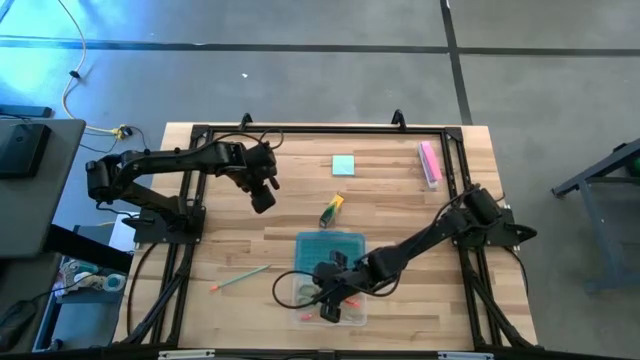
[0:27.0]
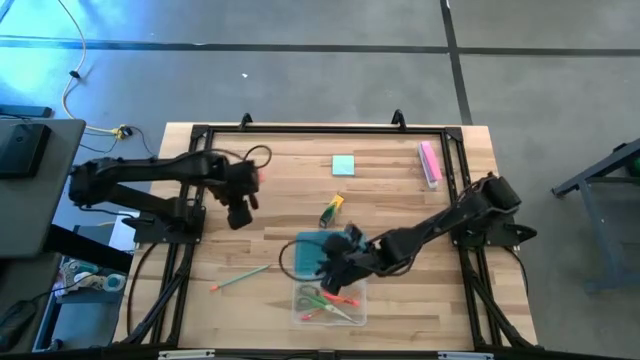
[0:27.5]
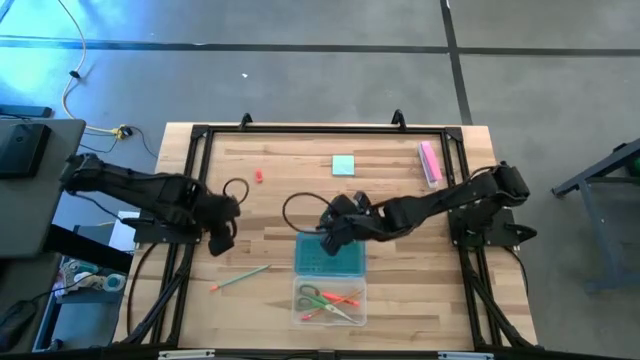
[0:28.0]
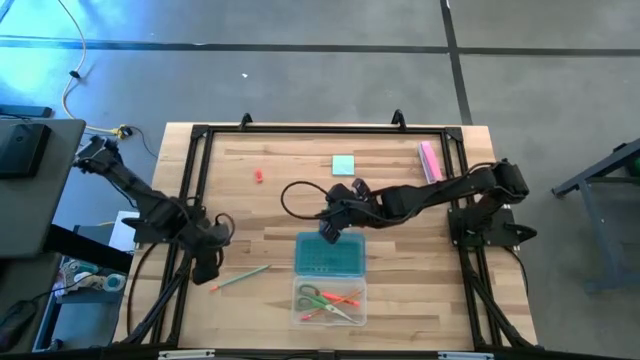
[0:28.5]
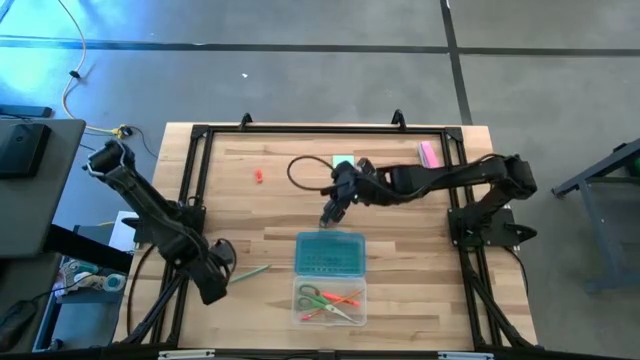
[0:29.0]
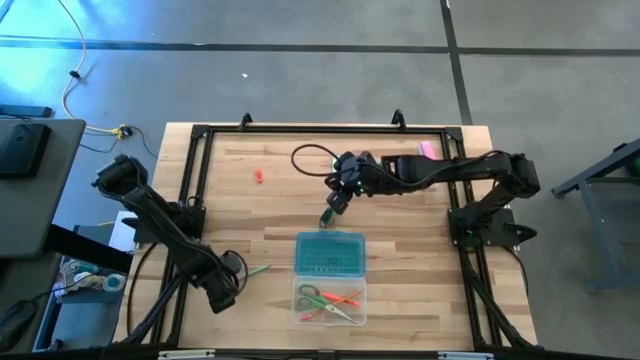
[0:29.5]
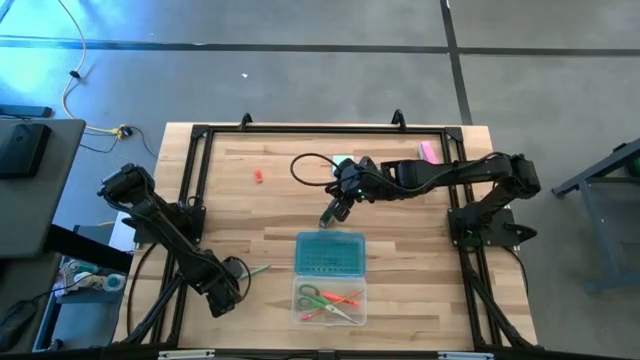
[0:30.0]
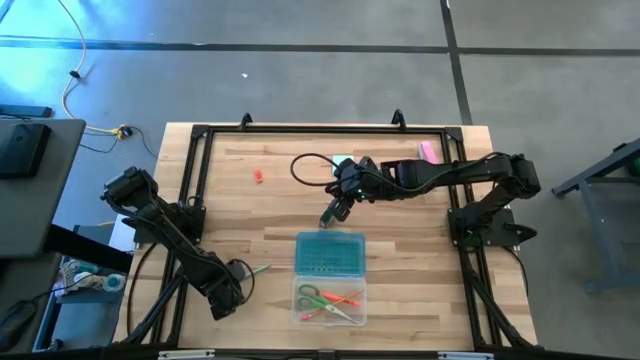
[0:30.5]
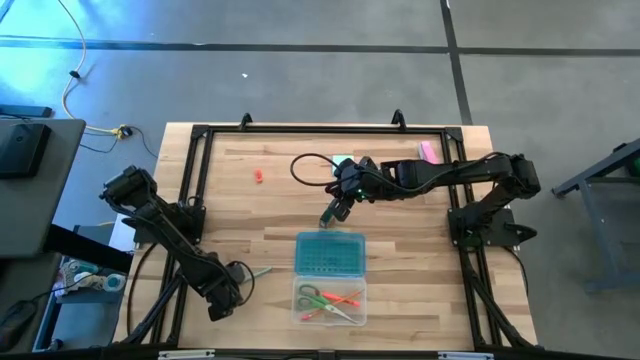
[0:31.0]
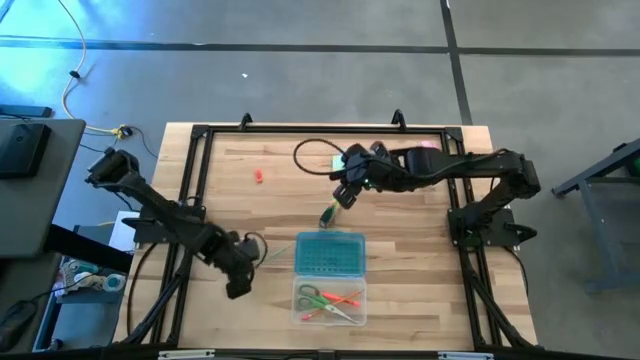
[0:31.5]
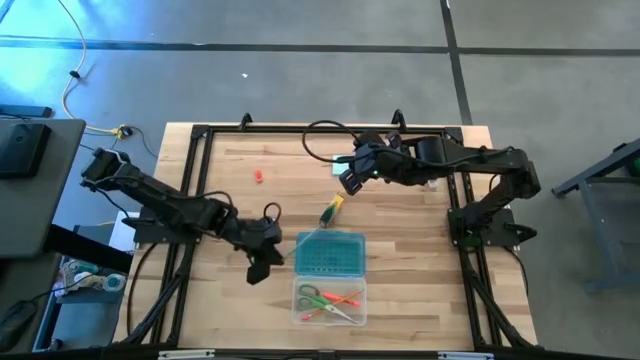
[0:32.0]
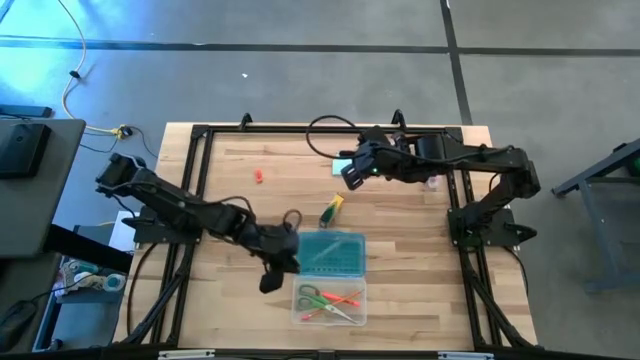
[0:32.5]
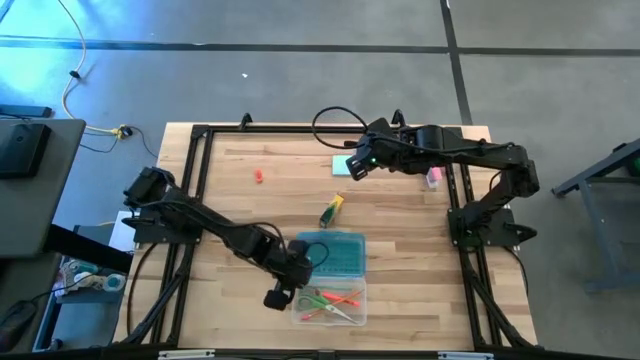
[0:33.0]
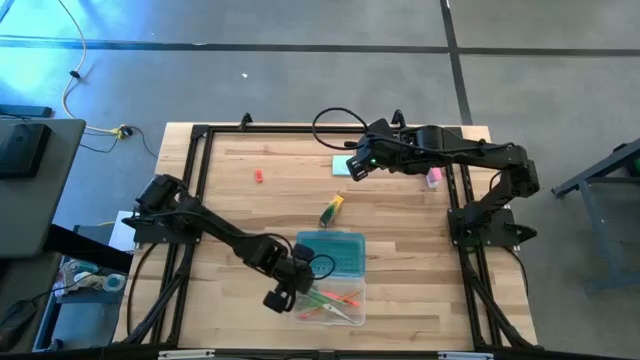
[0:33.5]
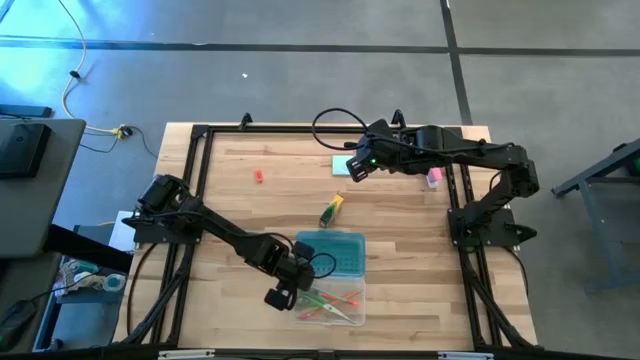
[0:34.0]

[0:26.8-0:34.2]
Task: Pack school essentials
Put the blue pencil into the supply box

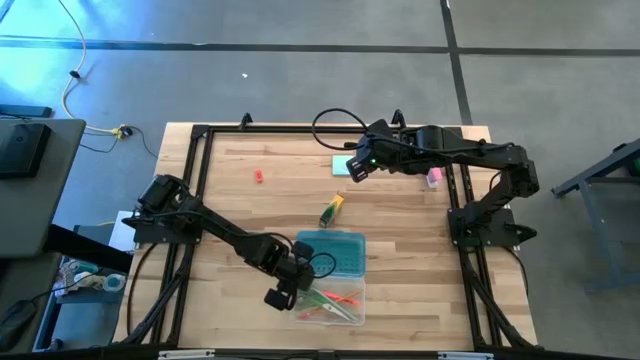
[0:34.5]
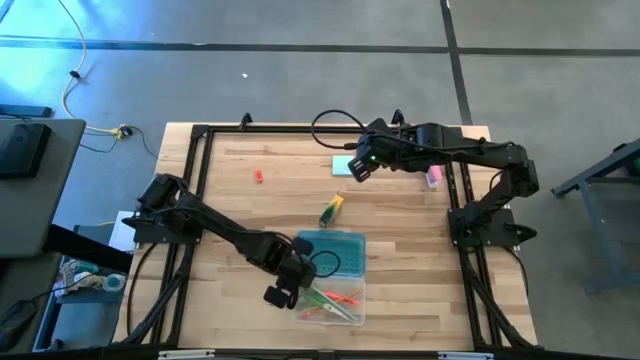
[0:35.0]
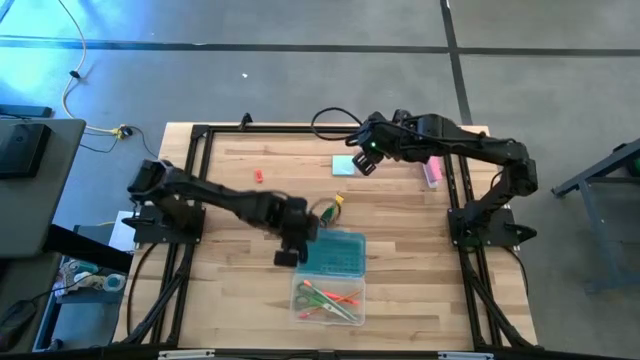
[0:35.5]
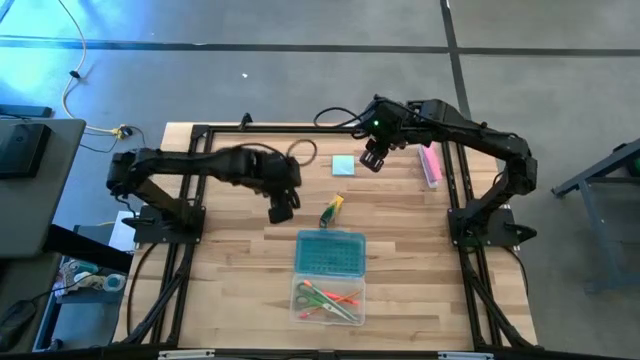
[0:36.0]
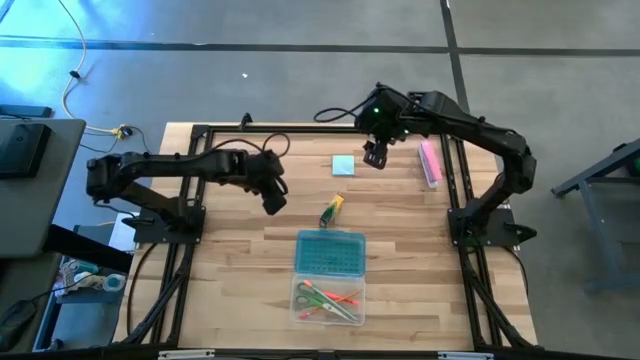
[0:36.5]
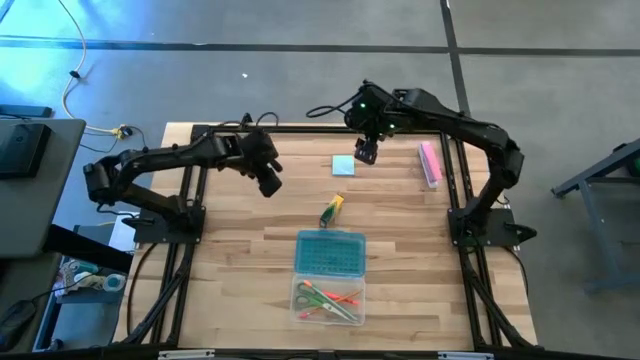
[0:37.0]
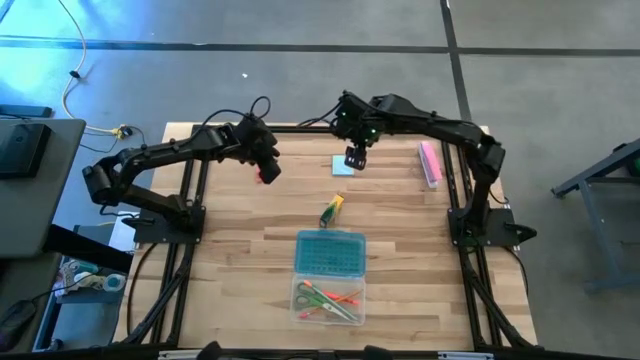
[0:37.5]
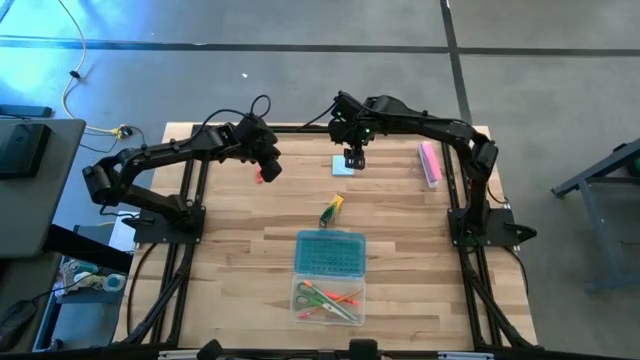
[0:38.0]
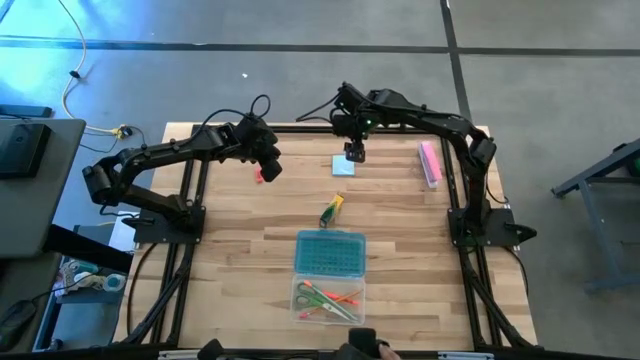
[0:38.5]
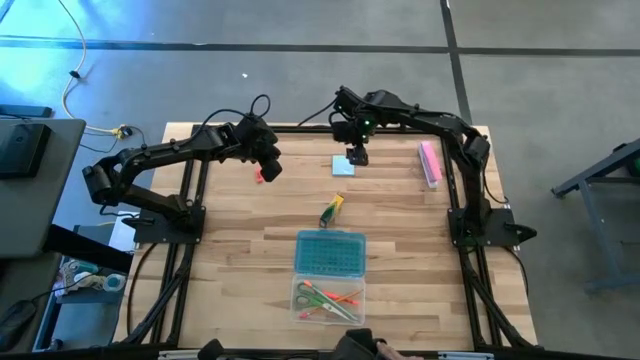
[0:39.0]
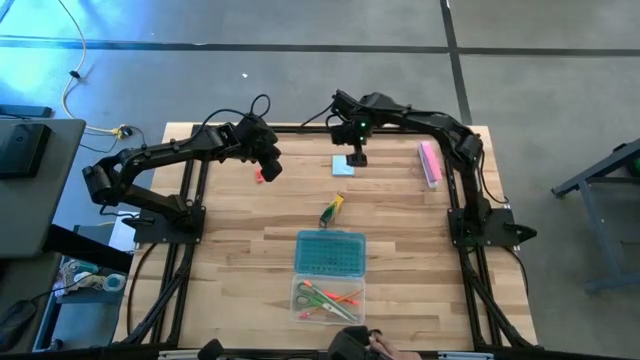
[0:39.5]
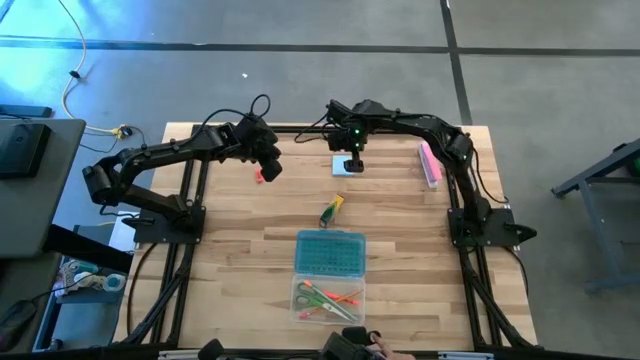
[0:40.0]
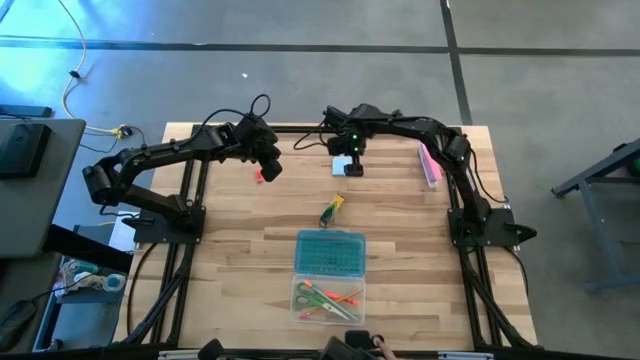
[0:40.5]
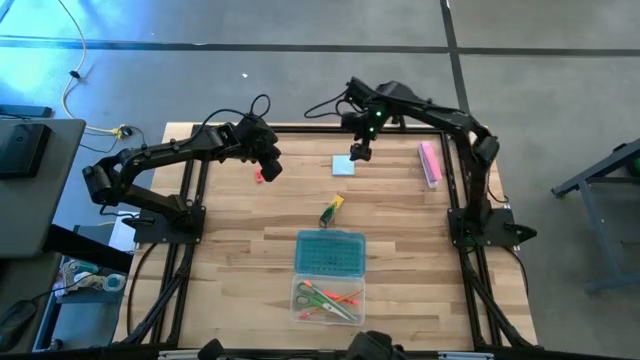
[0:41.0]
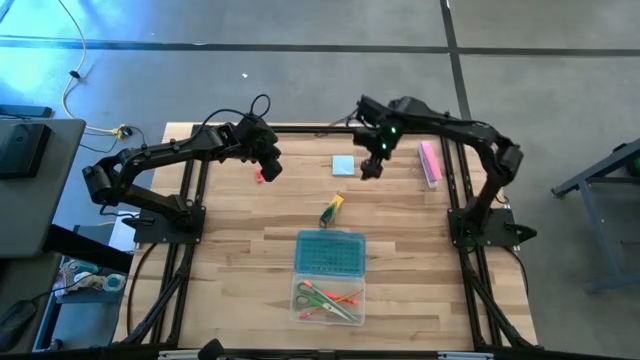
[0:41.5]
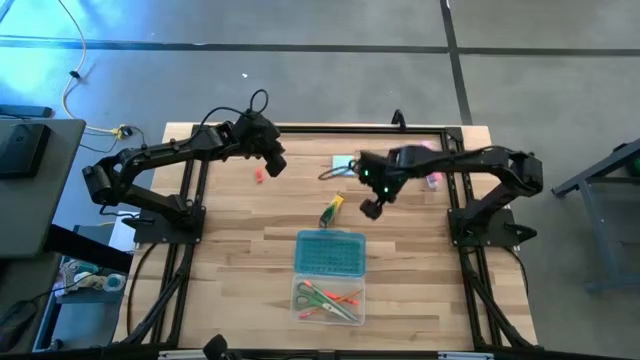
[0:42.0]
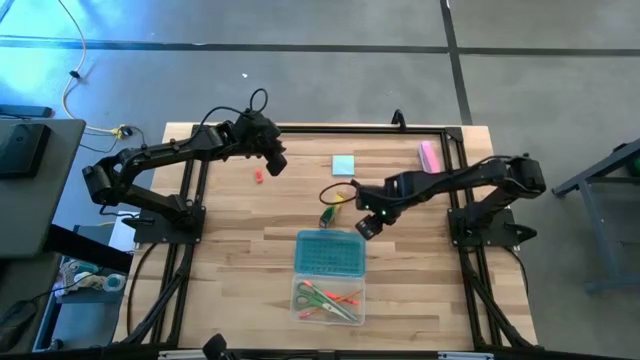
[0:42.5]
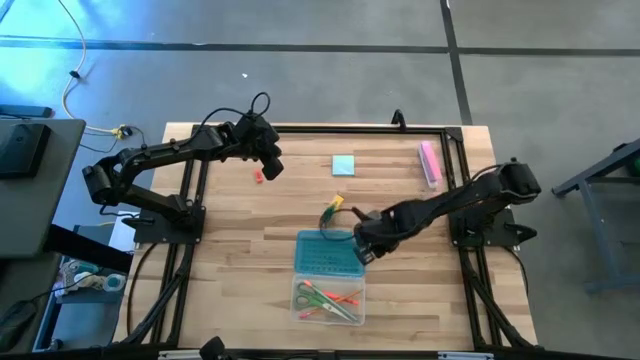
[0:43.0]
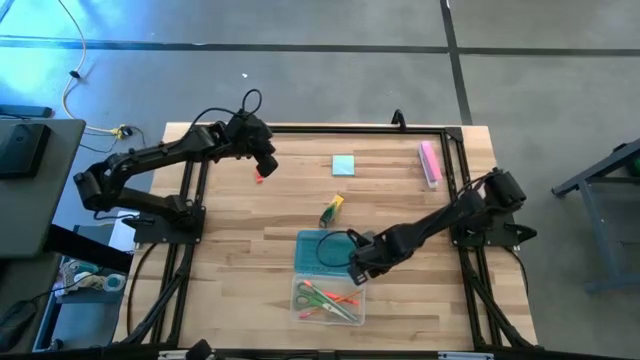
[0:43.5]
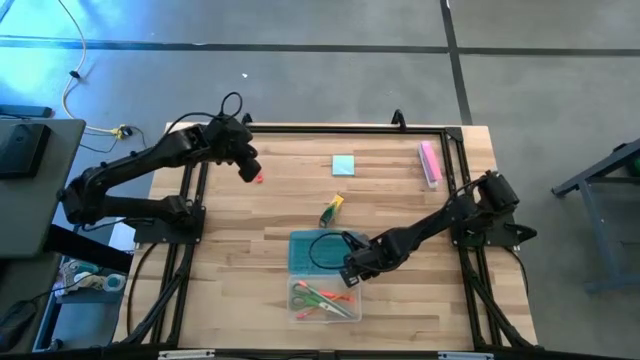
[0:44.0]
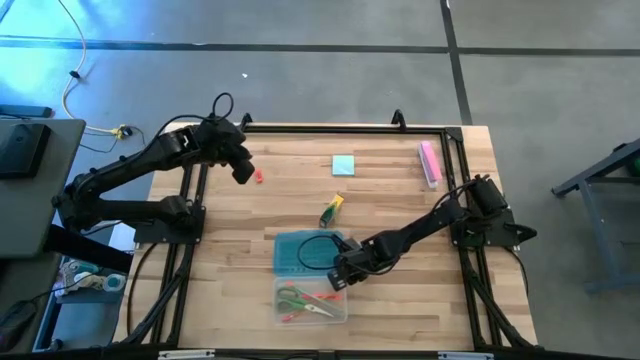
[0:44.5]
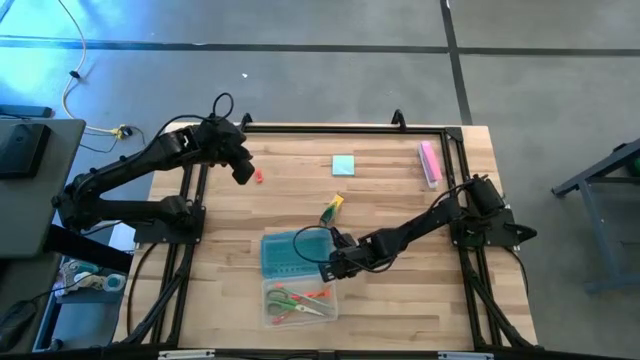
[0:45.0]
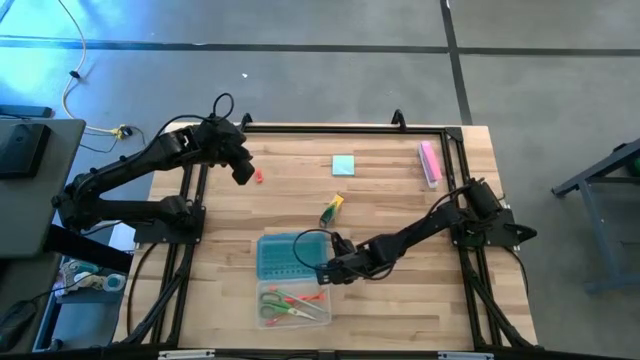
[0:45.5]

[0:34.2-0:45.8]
Adjust the supply box

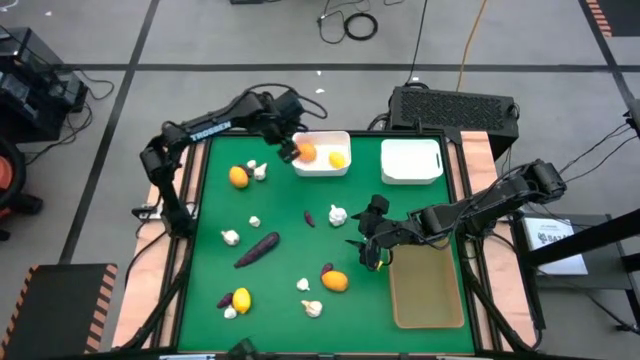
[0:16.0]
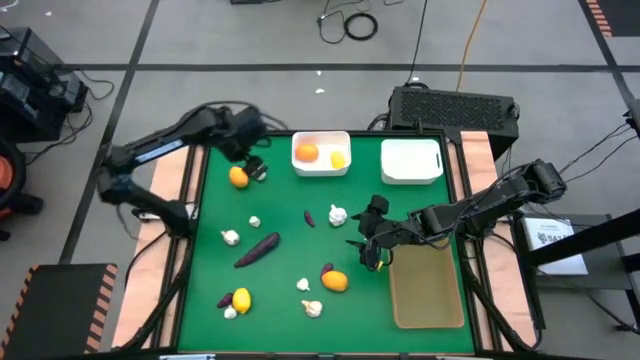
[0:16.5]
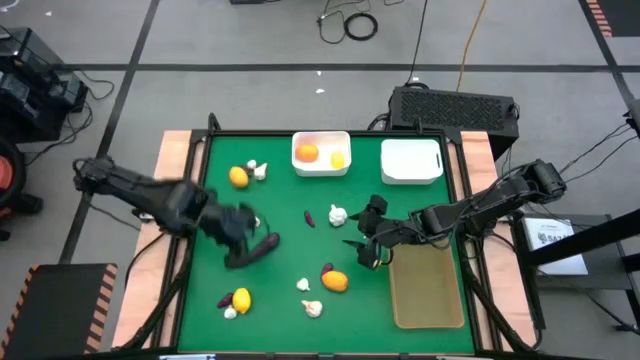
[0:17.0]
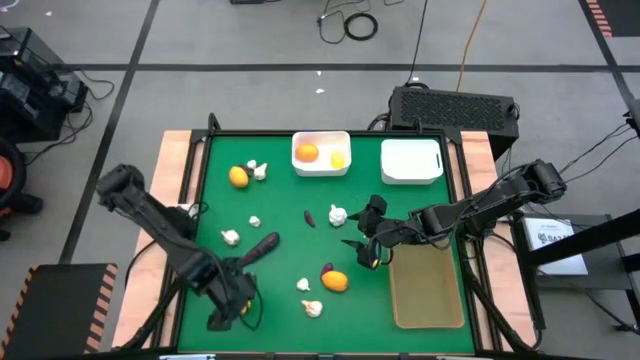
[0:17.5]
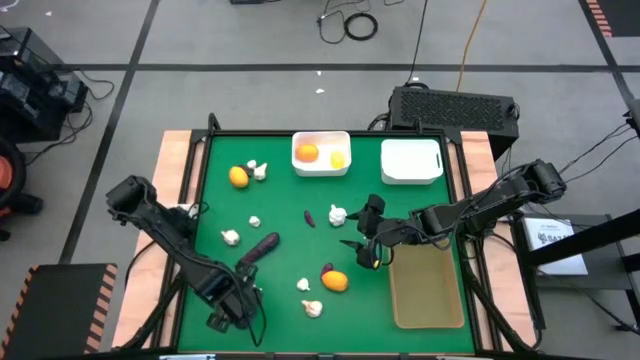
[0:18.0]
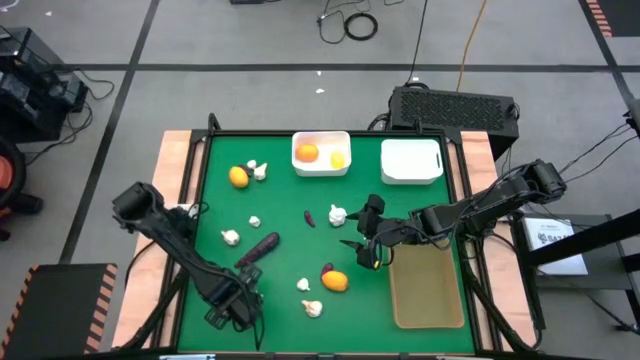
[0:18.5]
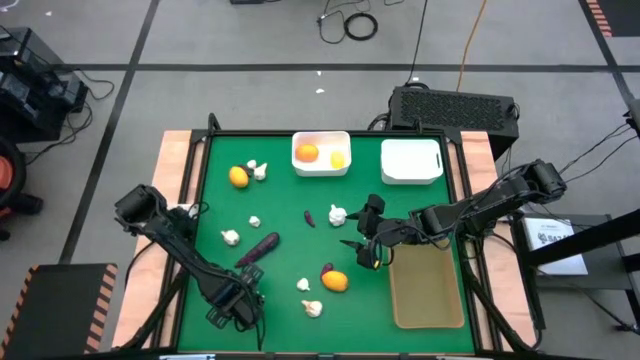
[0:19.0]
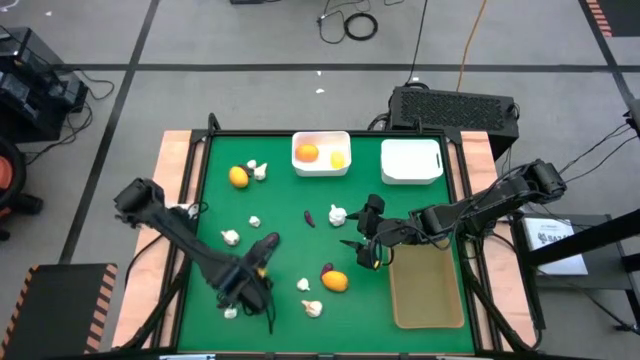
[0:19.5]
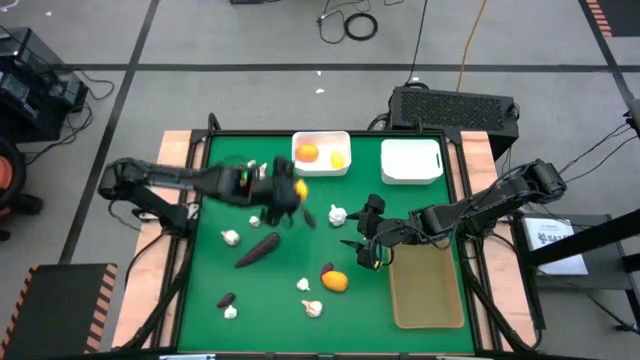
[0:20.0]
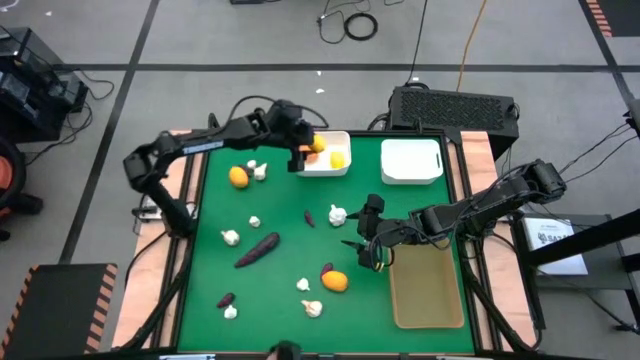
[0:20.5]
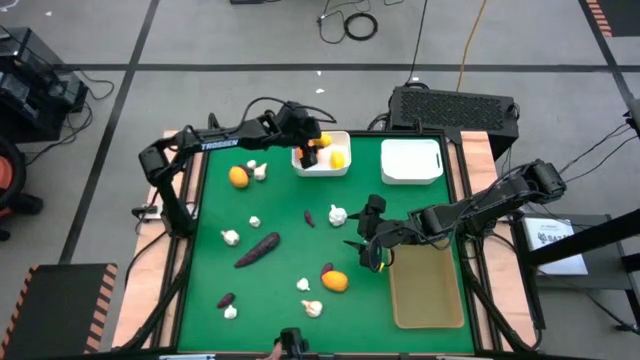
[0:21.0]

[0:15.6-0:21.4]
Task: Sort produce into baskets
Put the lemon into the left white bin
